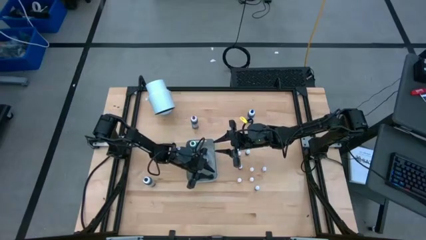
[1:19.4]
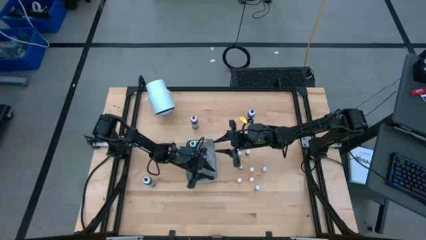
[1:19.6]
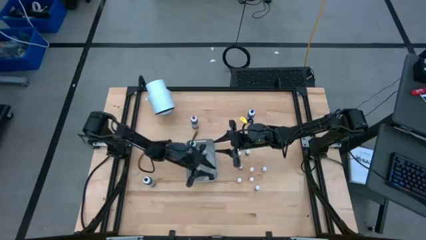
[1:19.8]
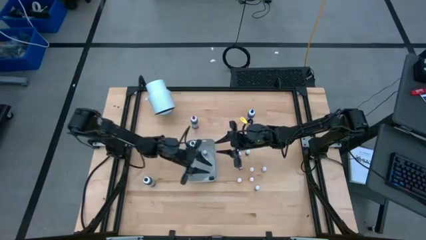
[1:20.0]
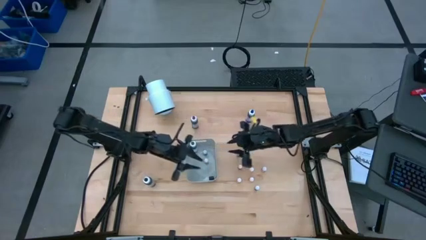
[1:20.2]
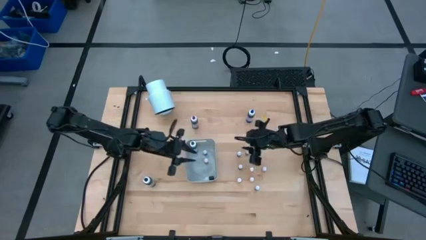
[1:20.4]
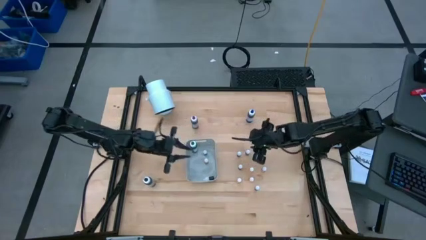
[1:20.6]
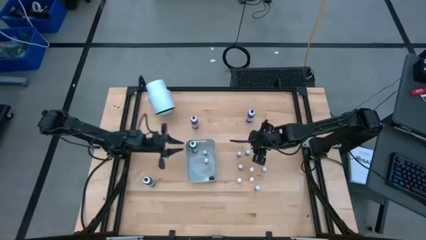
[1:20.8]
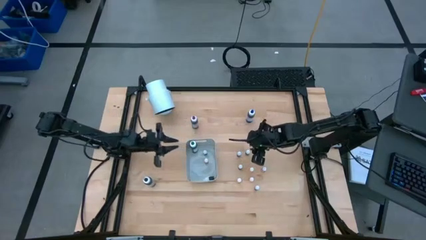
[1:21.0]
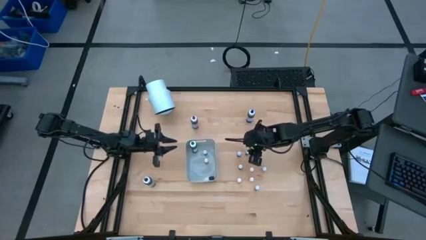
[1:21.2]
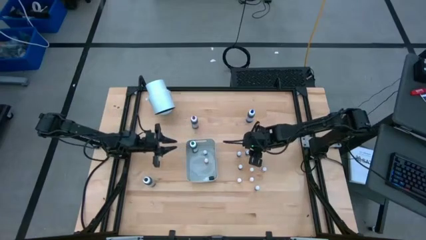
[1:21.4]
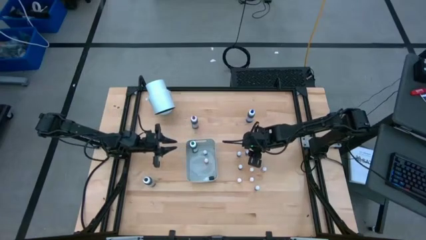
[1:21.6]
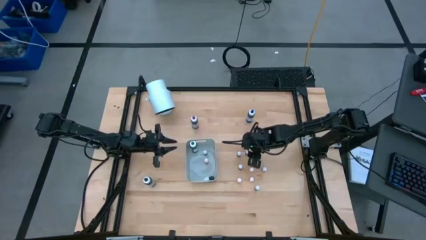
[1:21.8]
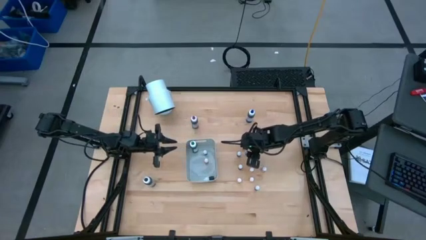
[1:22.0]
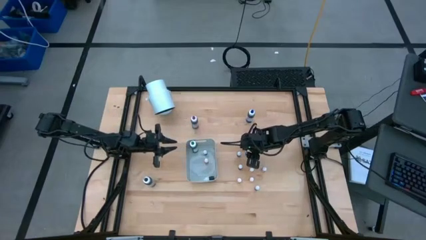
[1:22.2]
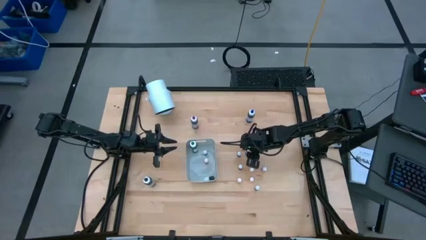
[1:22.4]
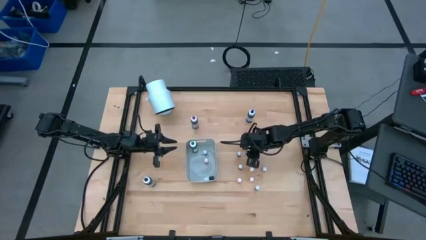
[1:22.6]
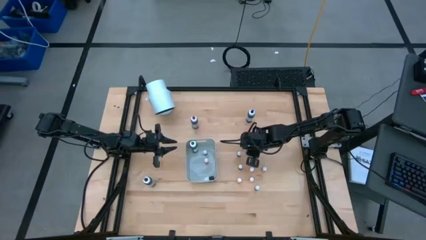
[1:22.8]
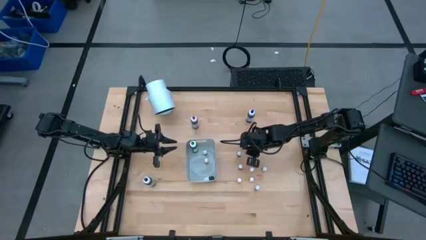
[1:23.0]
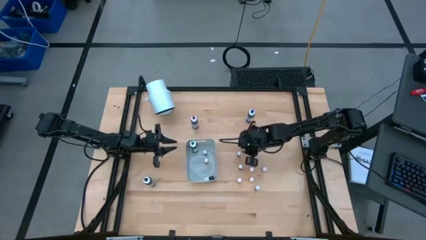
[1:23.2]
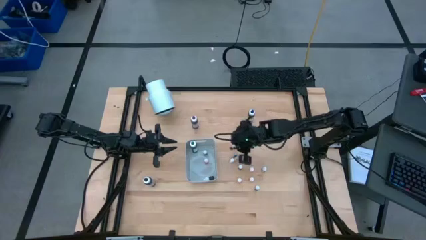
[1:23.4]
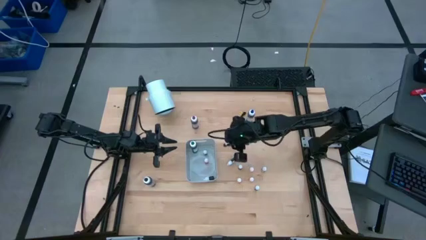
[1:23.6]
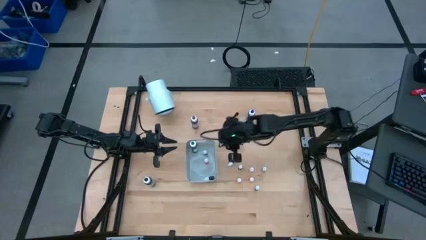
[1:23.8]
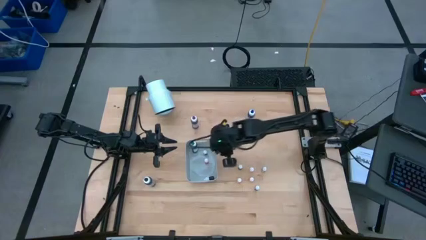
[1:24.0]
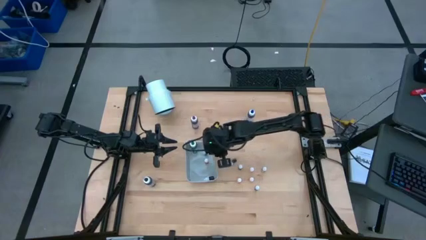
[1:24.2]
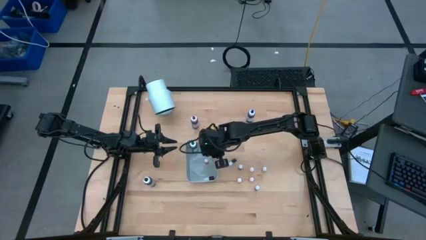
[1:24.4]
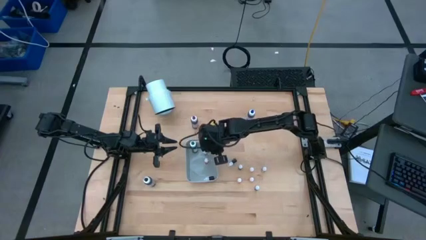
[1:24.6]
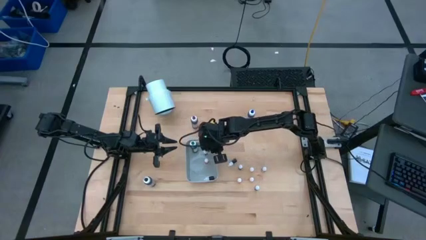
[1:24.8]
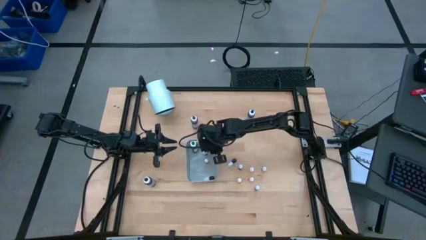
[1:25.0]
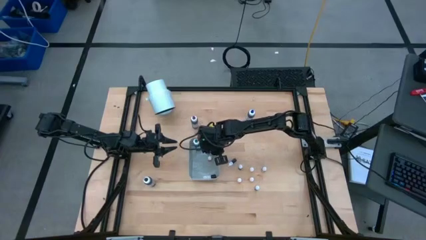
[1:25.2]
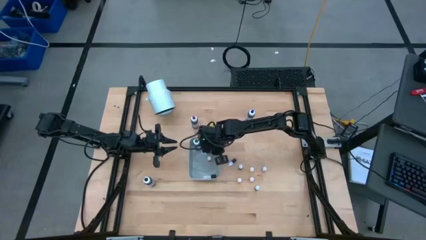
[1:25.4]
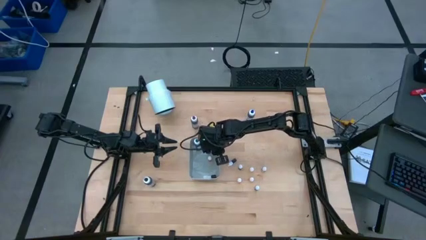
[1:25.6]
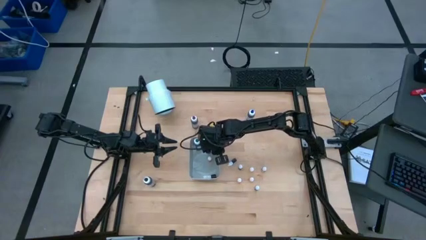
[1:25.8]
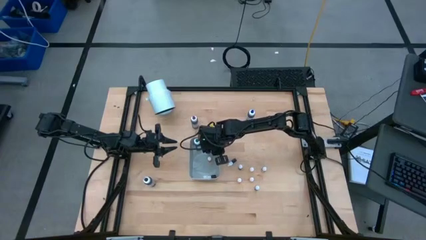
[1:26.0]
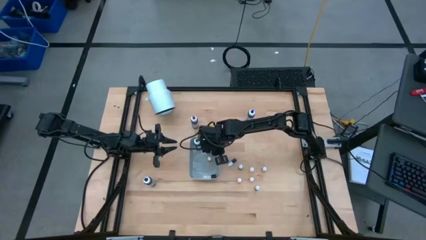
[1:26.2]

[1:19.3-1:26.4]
Task: Pick & Place food coloring
Put the top purple food coloring bottle into the bin

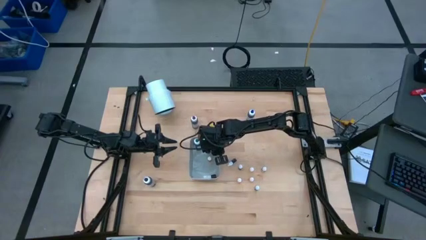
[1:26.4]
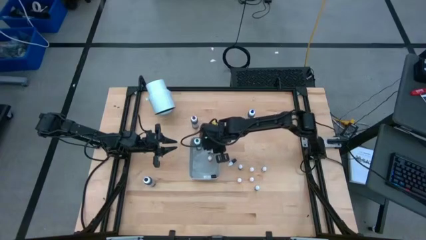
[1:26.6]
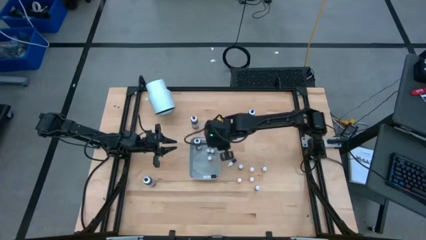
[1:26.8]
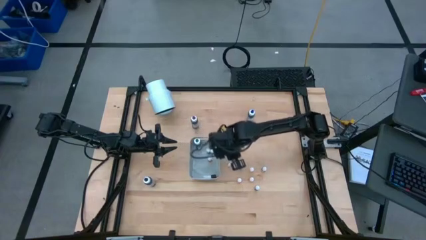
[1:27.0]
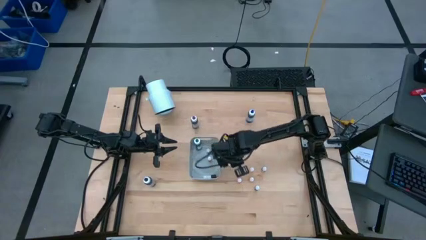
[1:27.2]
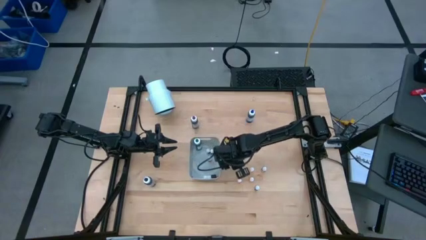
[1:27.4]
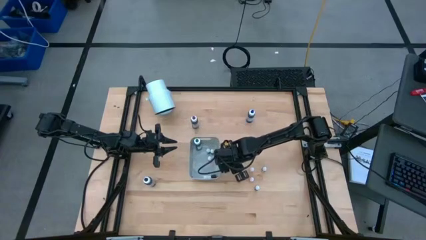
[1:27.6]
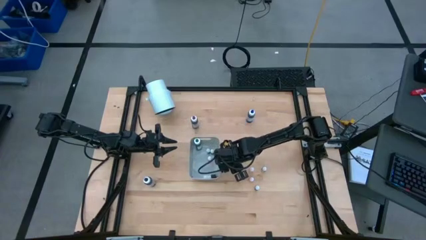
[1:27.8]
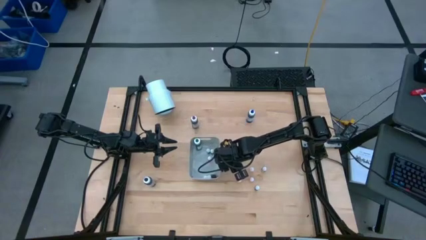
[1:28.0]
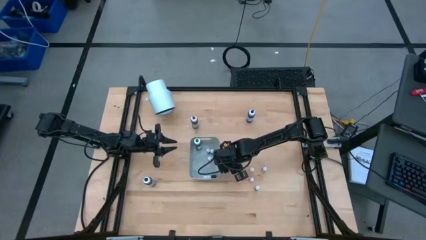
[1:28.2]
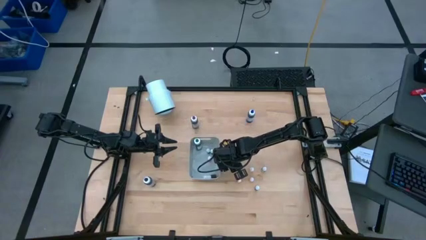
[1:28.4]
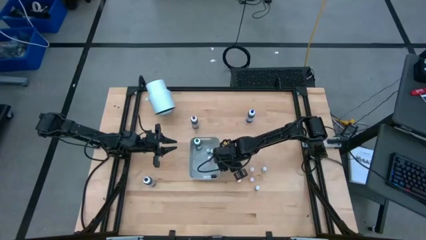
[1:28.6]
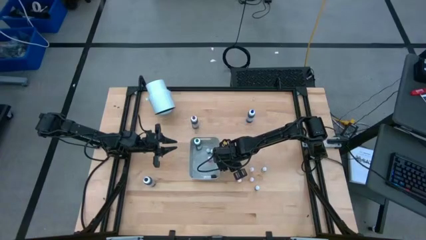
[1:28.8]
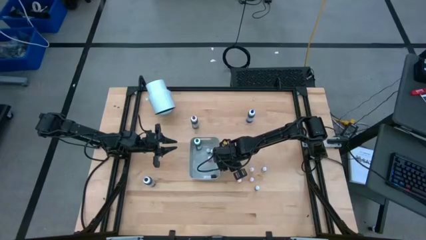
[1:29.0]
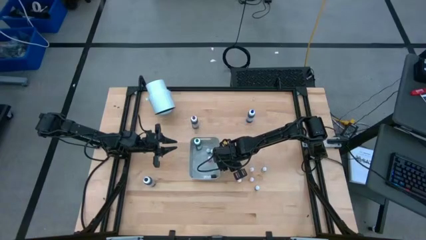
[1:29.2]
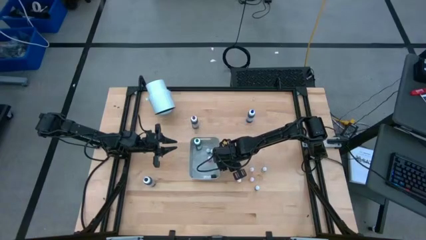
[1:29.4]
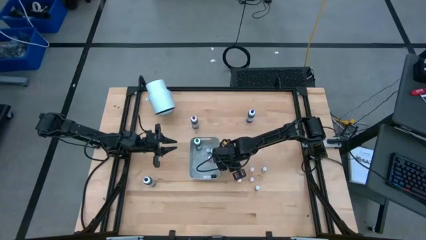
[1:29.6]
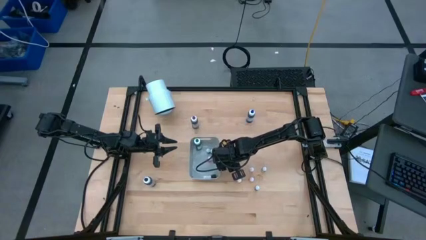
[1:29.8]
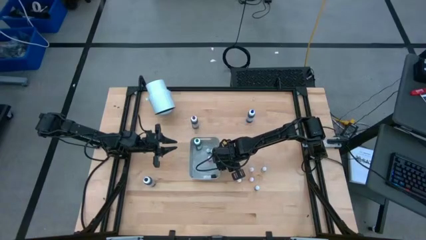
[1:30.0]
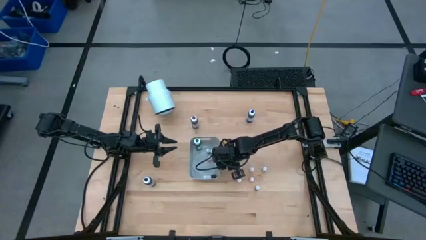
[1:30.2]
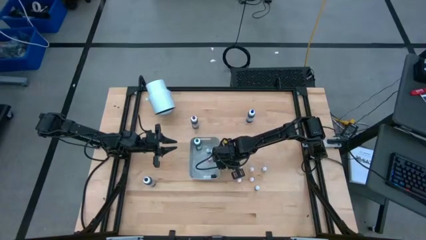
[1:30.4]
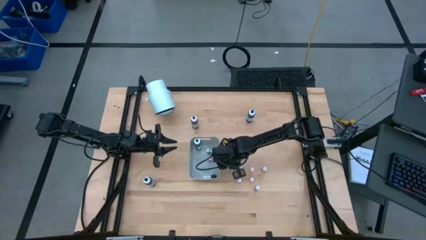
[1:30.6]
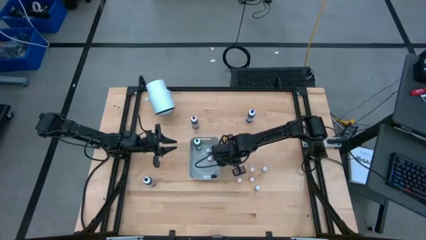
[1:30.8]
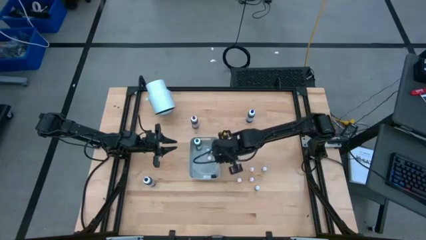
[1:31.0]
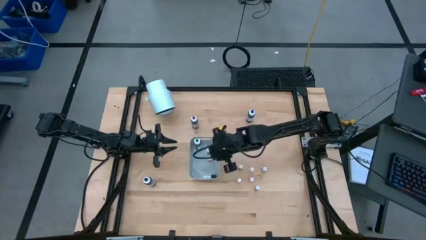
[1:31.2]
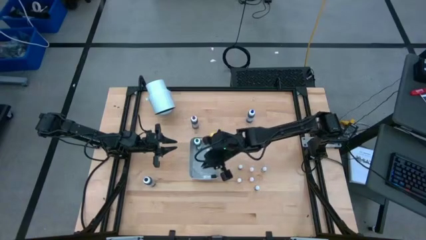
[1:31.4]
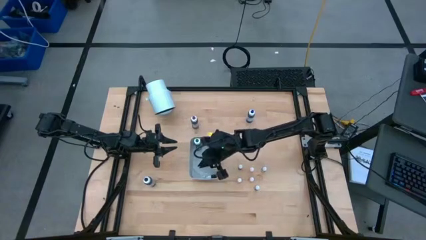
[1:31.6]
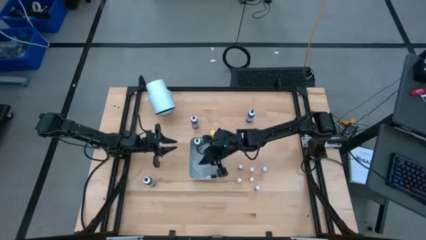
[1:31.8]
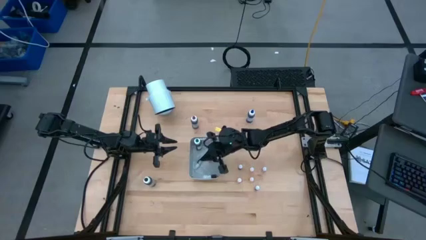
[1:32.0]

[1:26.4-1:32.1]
Put the top blue food coloring bottle into the bin

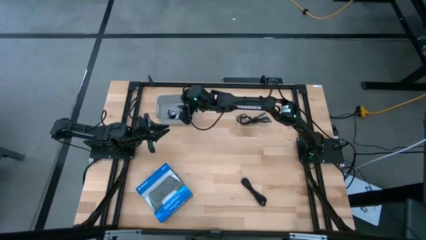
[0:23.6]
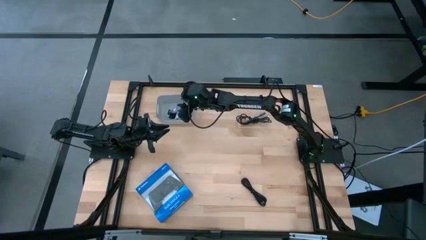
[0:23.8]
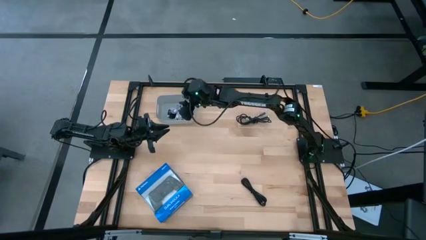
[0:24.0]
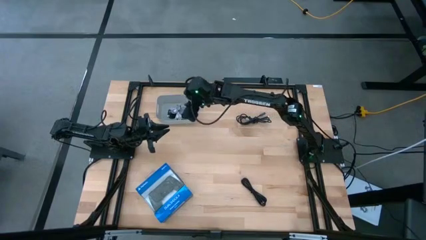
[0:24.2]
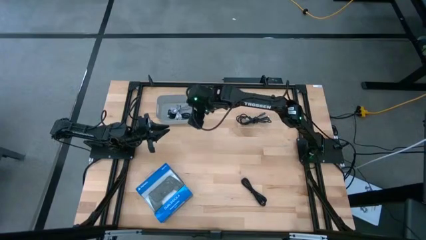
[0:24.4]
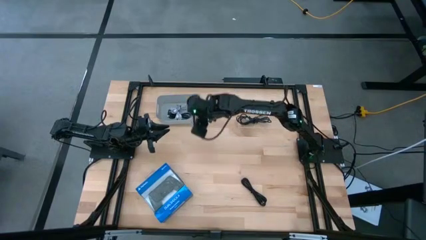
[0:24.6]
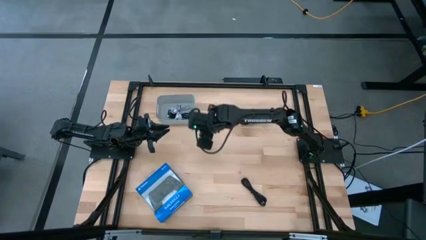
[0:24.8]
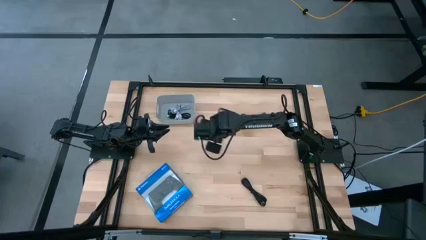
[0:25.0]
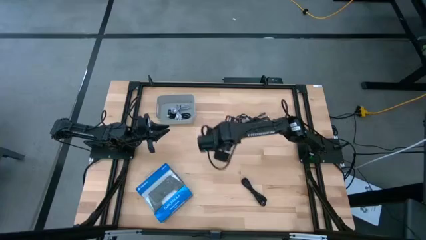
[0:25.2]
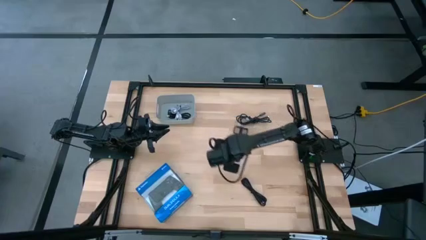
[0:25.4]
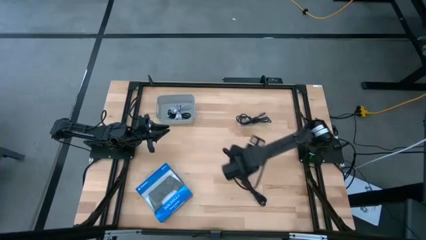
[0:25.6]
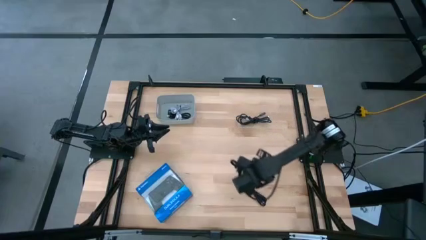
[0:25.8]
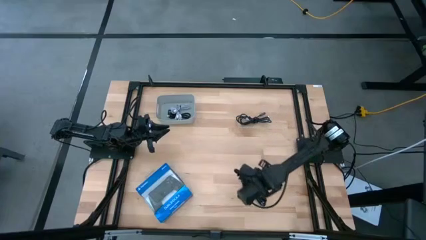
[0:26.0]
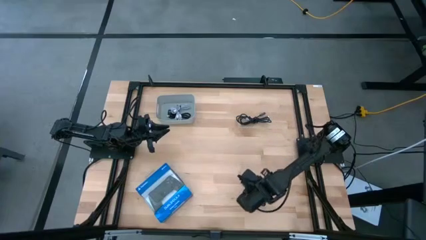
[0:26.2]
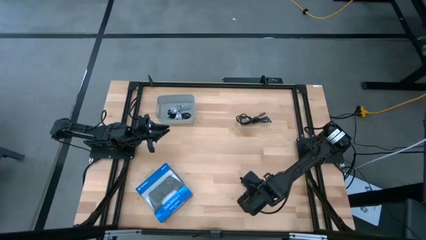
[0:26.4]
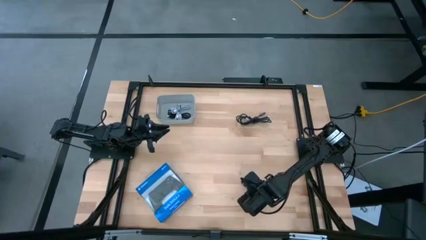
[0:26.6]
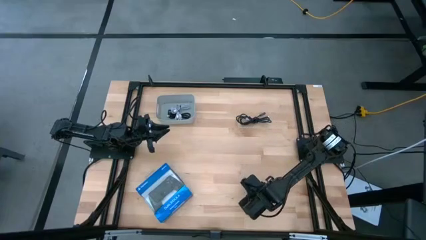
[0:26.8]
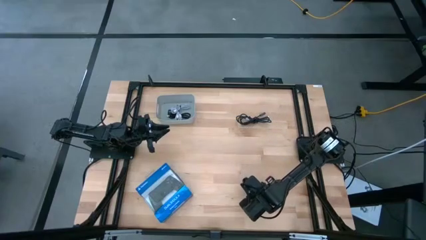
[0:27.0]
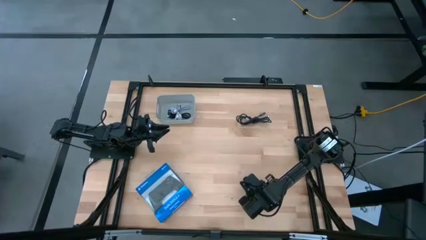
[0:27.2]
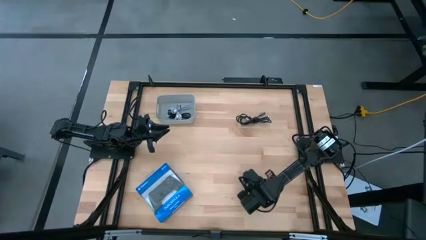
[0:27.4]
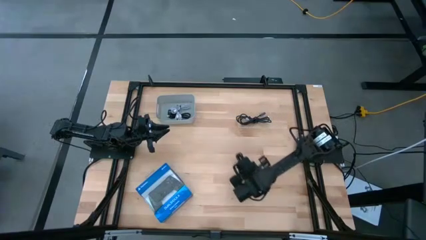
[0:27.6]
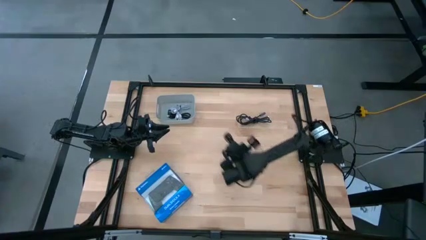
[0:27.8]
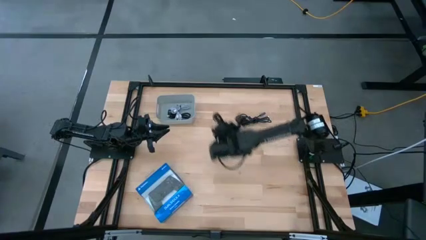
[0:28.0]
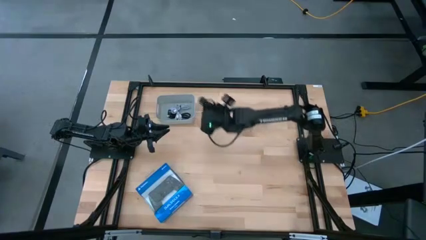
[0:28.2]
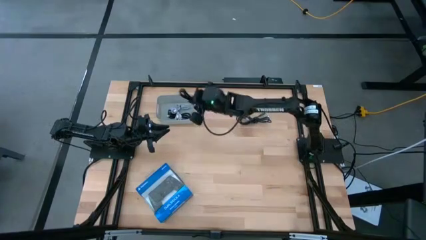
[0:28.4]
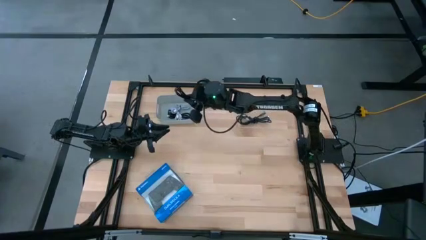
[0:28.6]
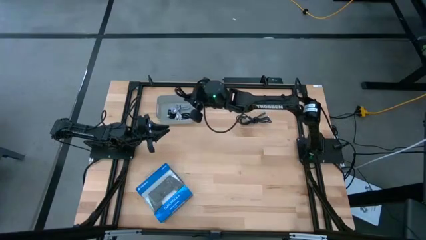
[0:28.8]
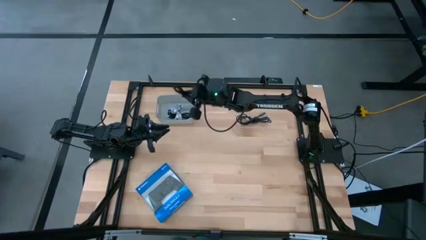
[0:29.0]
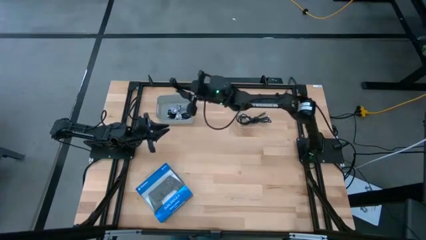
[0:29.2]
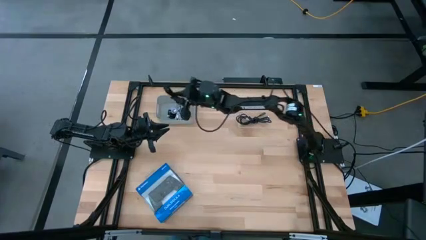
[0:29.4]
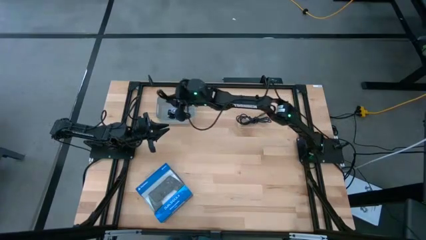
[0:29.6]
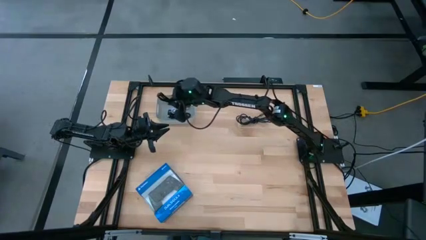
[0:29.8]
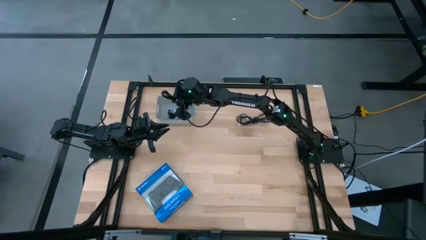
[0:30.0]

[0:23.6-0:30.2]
Task: Pick and place USB-C Cables
Put the black charger cable into the white bin
